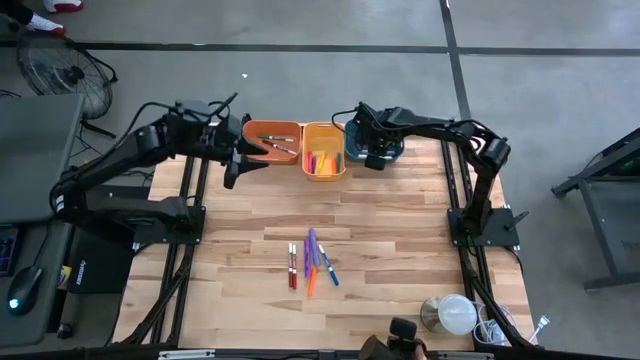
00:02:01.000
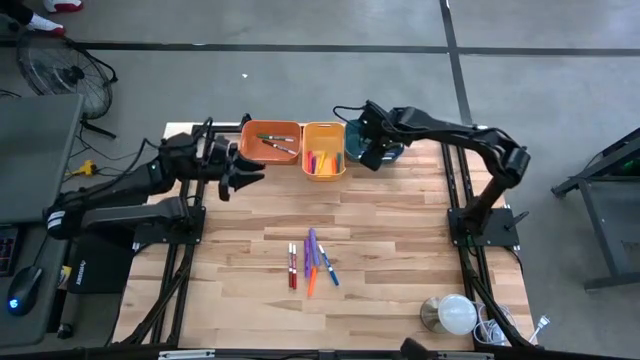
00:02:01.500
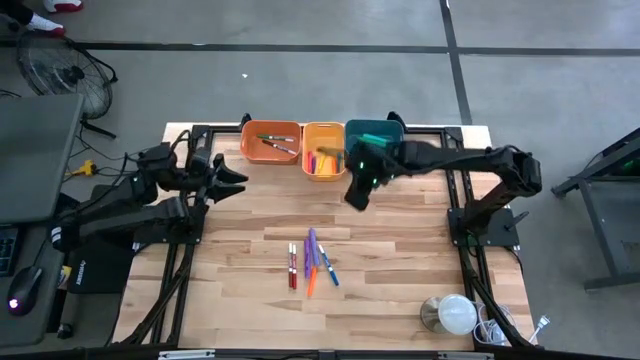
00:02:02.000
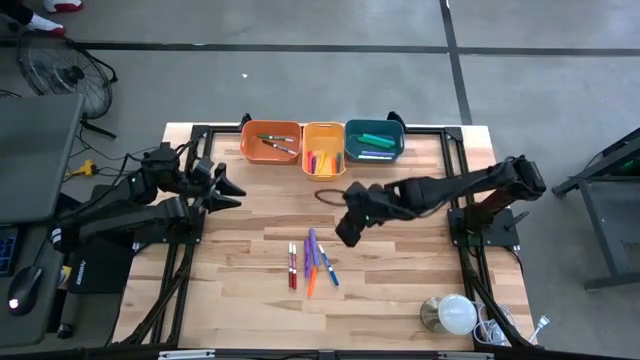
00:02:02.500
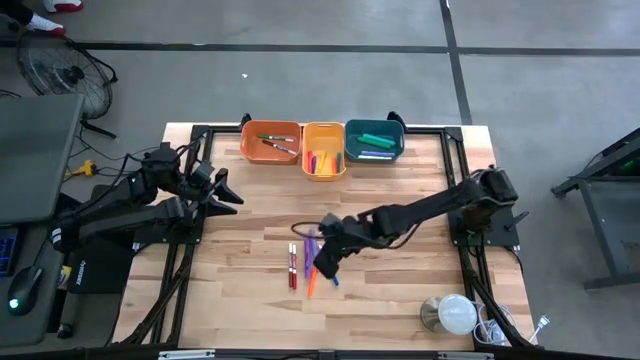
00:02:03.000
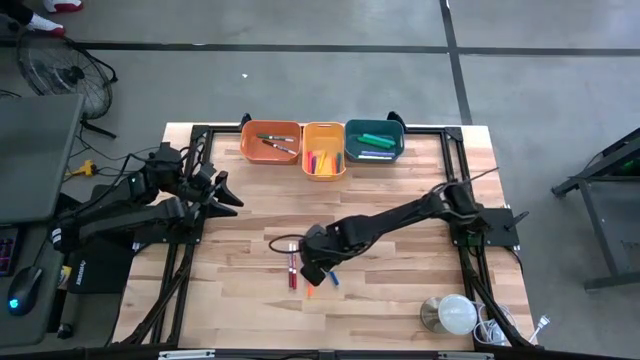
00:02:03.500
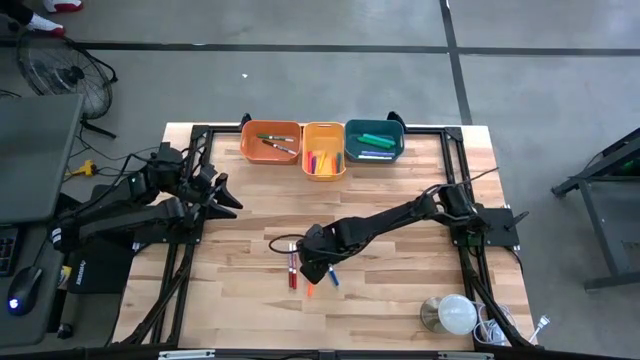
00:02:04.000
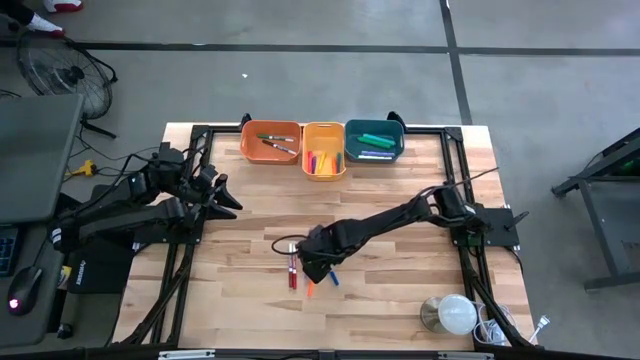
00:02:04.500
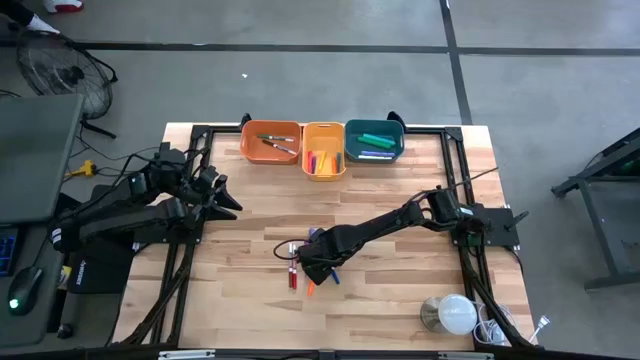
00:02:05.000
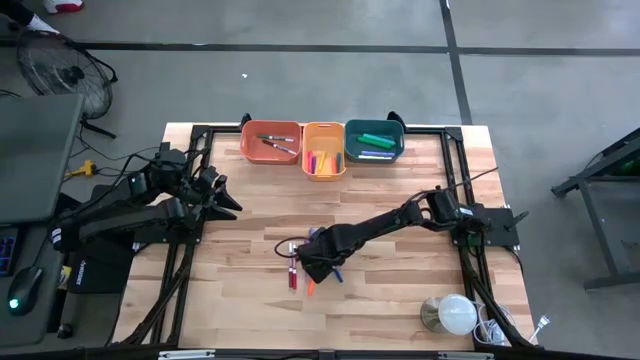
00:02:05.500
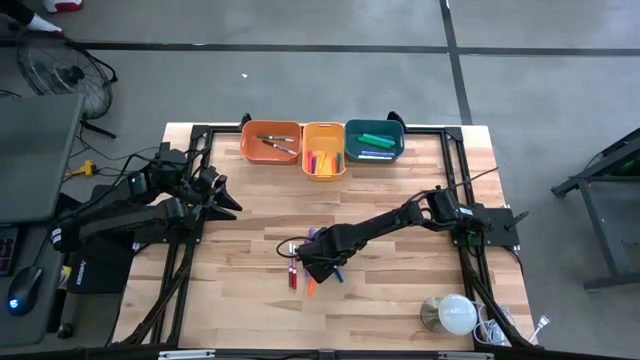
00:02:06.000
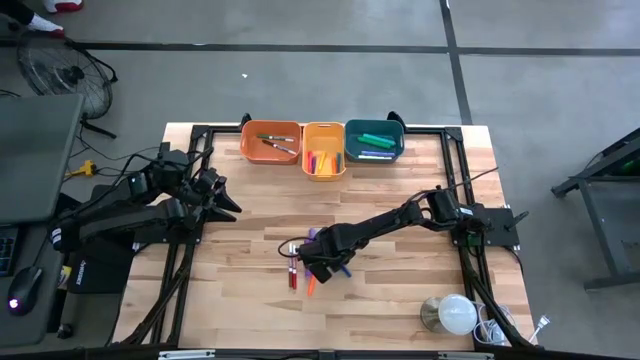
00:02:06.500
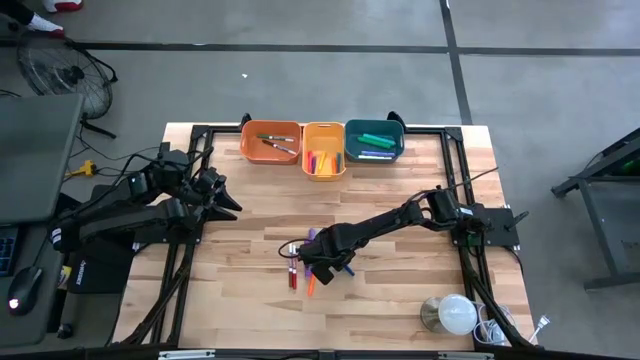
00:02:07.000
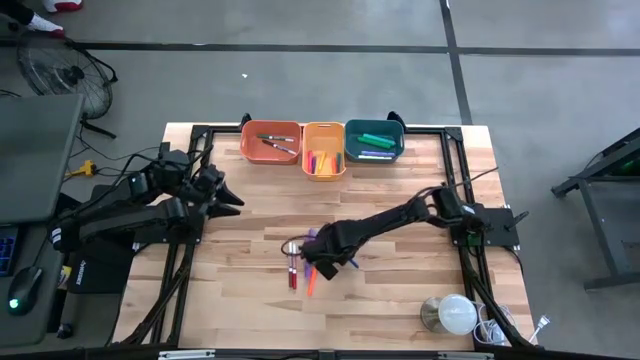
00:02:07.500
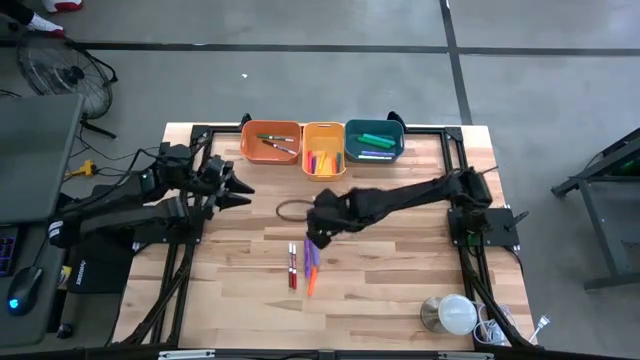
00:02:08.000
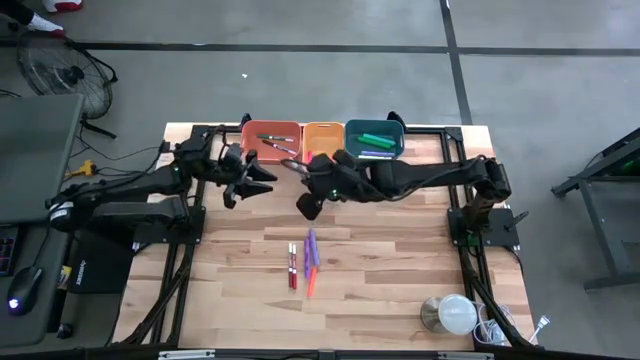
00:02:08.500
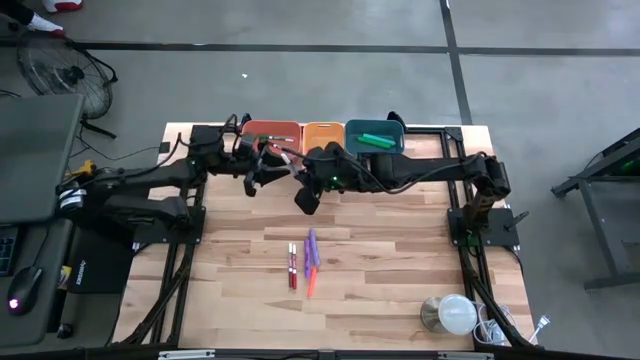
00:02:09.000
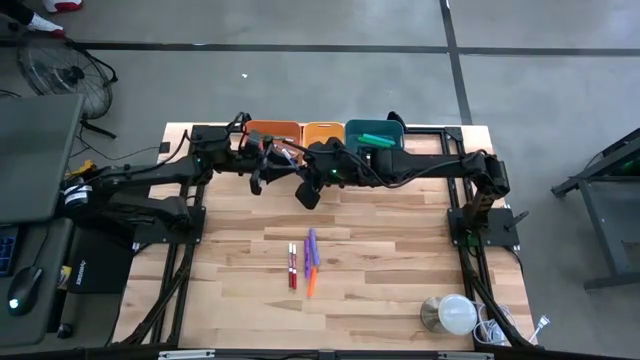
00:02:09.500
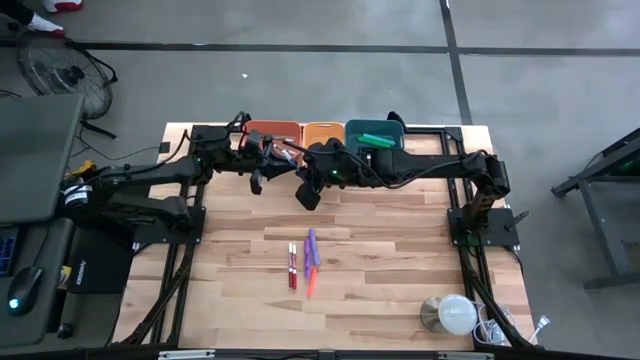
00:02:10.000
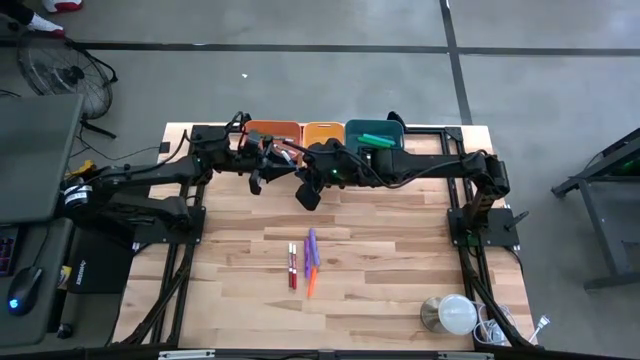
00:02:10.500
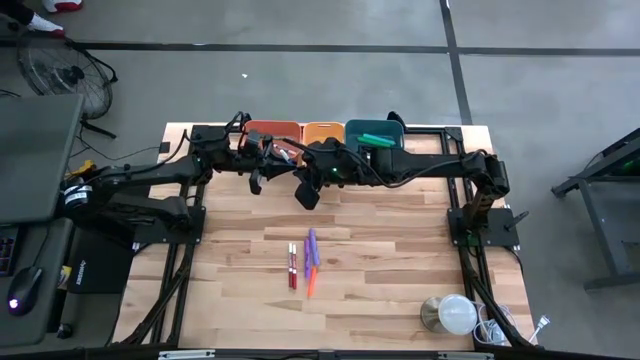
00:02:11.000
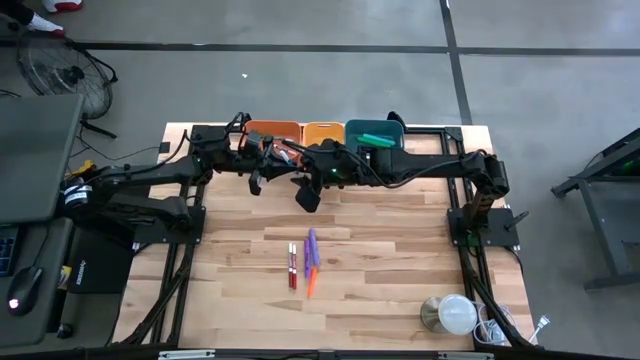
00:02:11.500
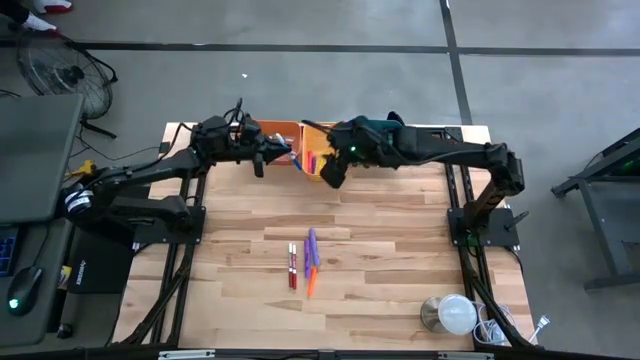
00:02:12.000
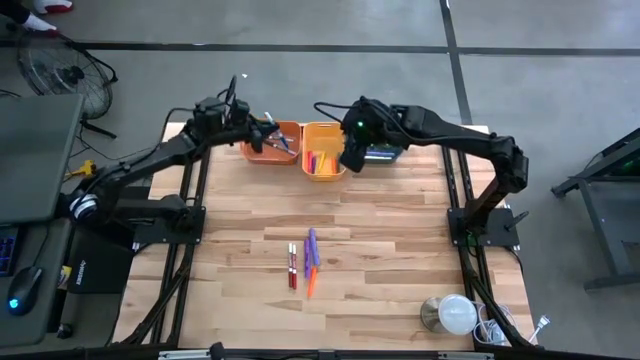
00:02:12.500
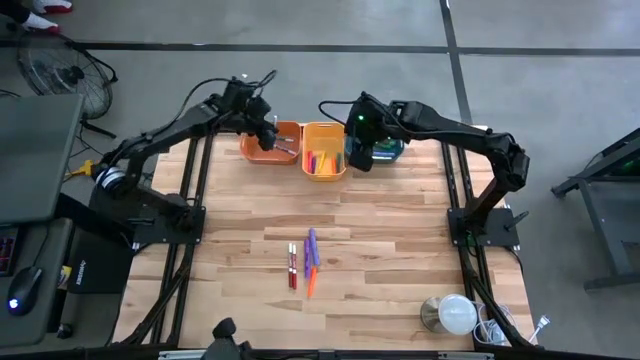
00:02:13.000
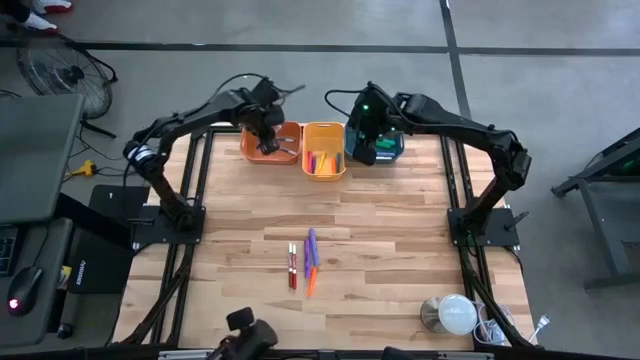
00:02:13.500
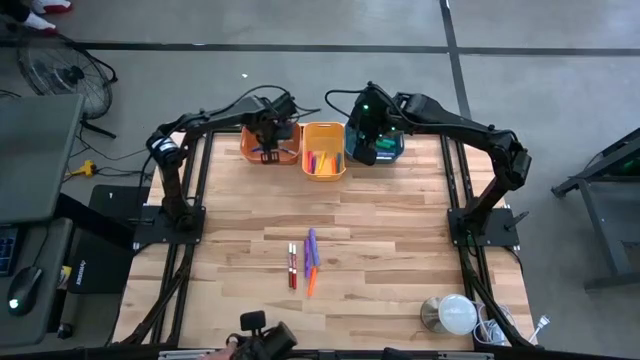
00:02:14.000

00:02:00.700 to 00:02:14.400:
Task: Pick & Place Markers
Put the blue marker into the orange bin

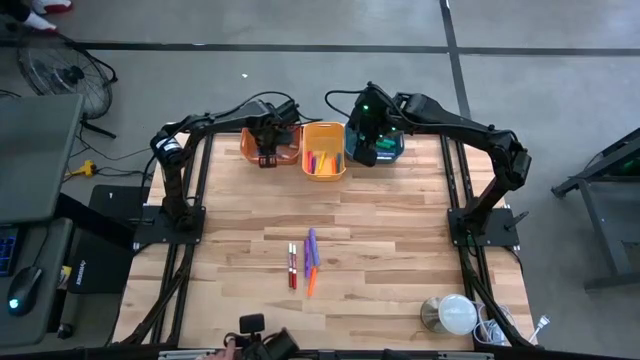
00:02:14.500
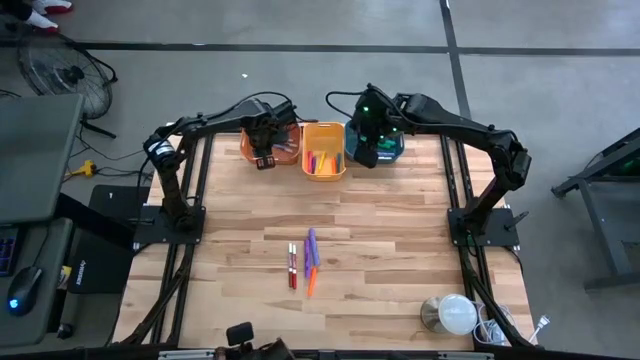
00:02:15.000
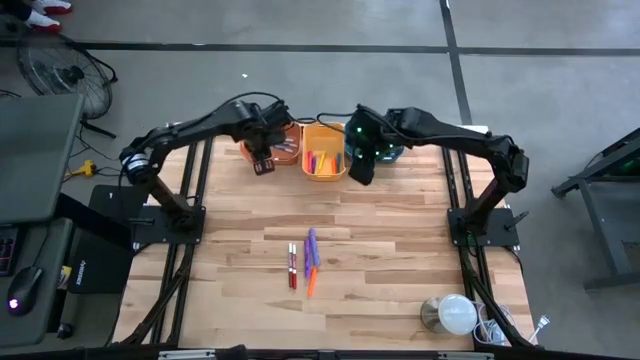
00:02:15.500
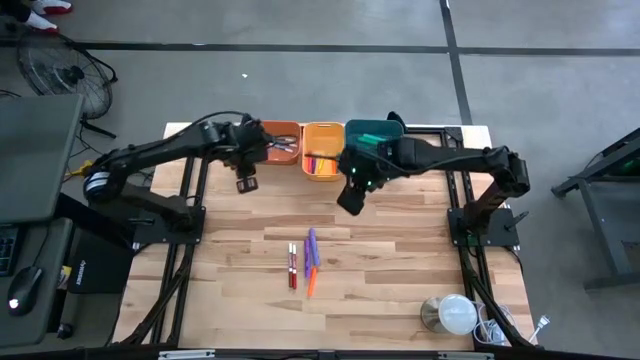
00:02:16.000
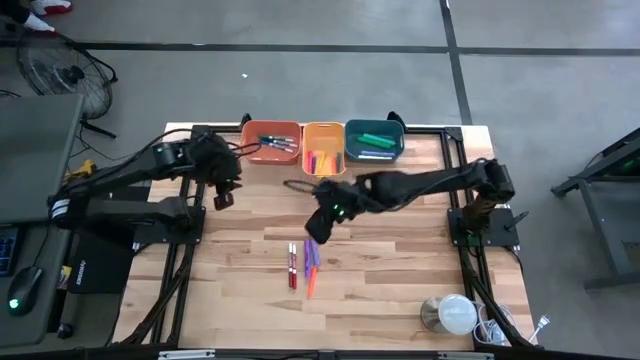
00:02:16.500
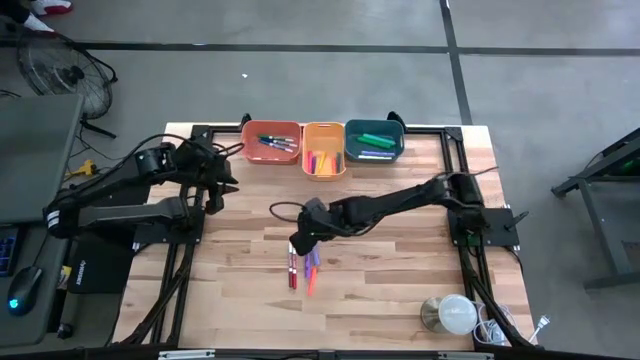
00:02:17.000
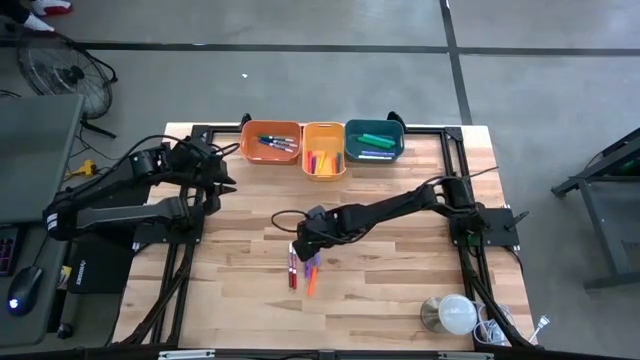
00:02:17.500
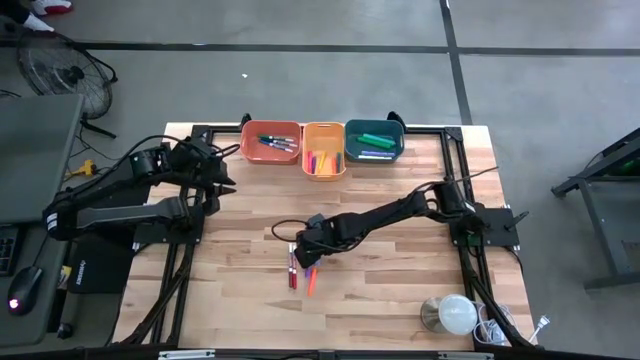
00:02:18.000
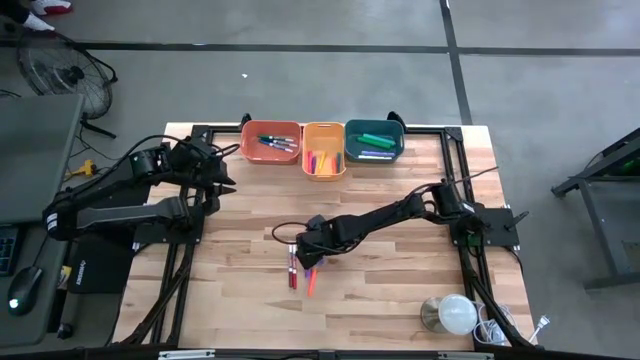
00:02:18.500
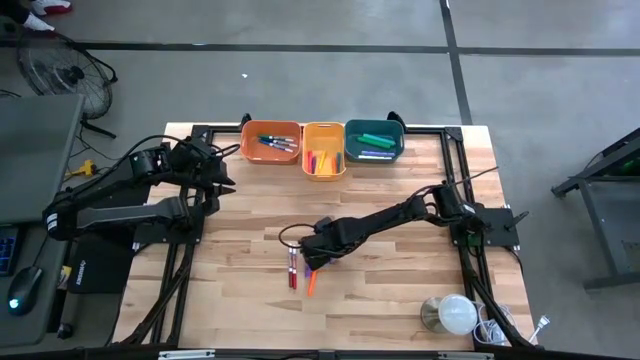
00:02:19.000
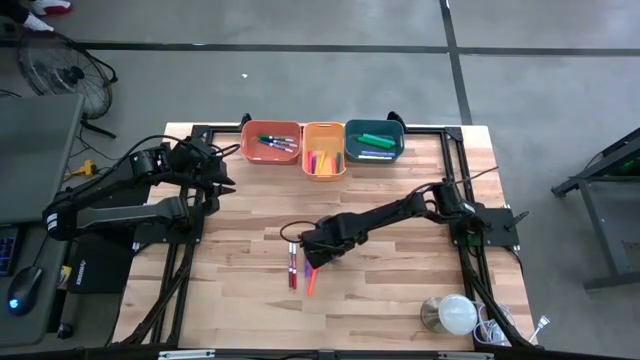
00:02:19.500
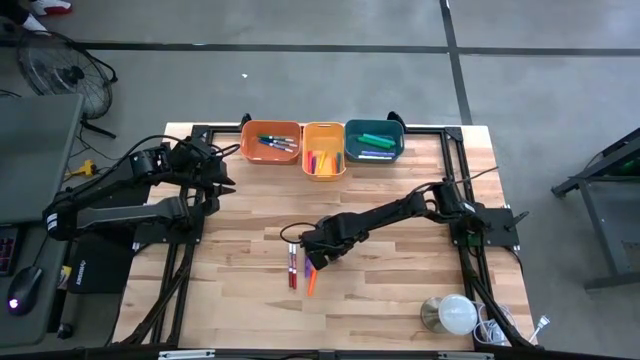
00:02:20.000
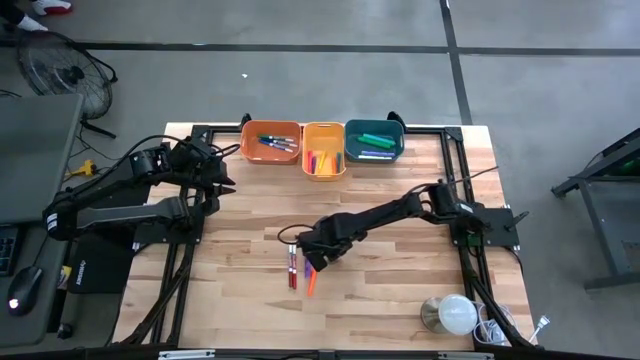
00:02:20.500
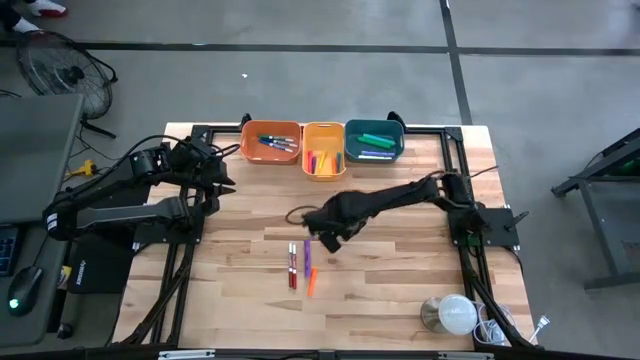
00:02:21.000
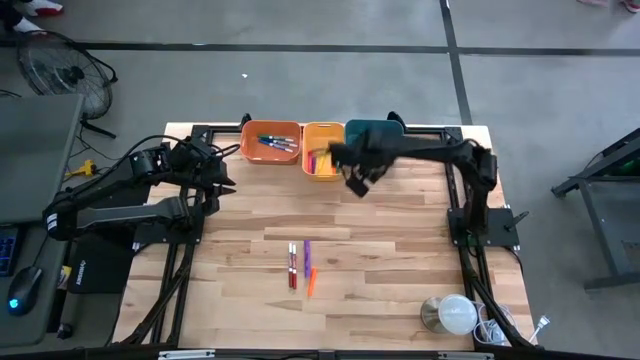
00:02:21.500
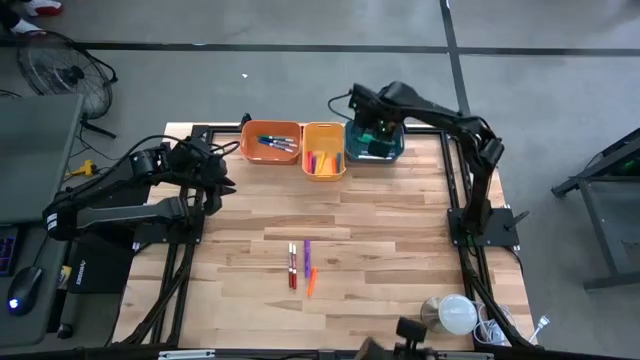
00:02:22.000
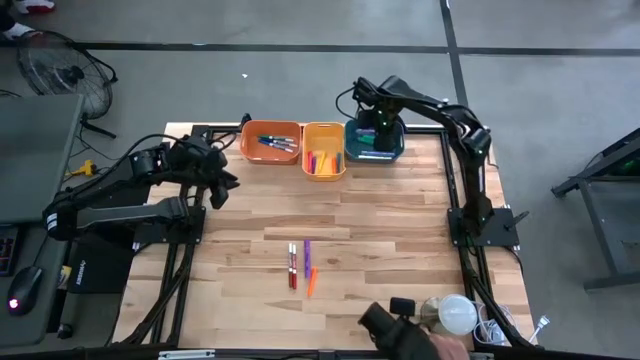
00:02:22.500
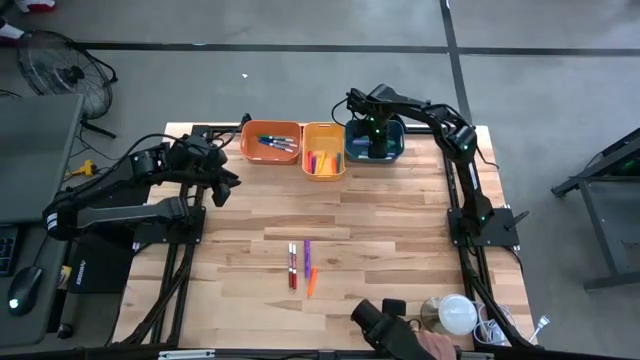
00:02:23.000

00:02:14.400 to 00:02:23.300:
Put the purple highlighter into the blue bin
